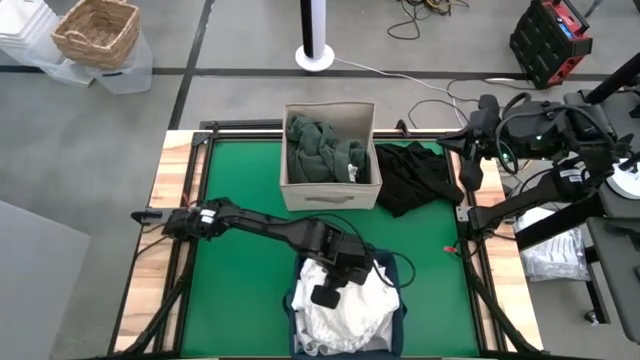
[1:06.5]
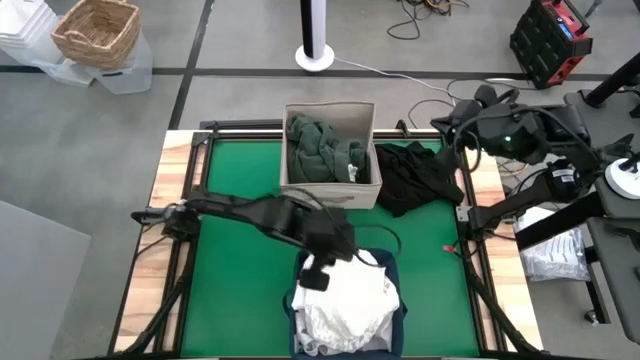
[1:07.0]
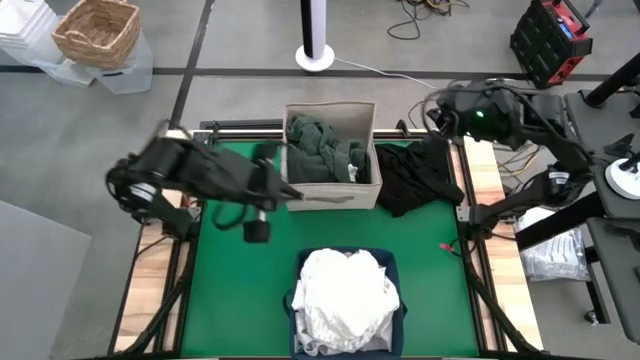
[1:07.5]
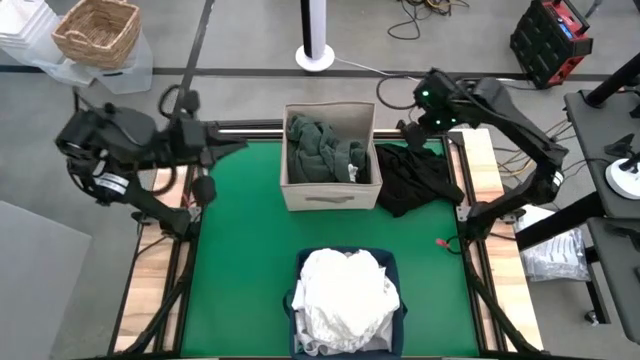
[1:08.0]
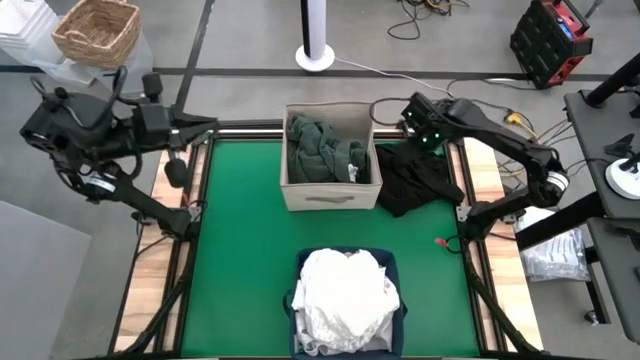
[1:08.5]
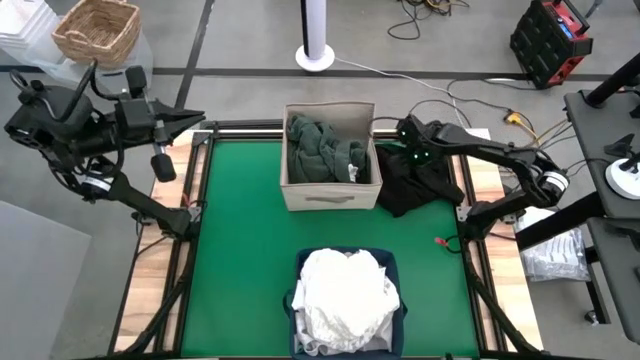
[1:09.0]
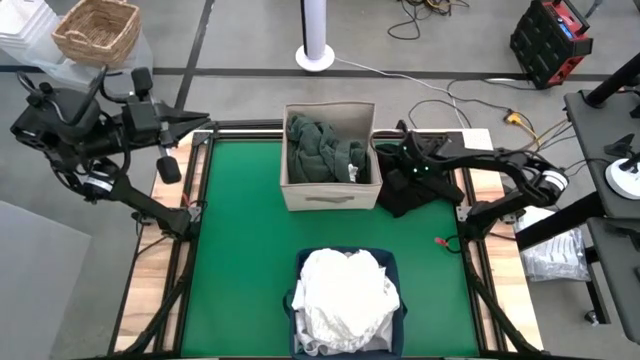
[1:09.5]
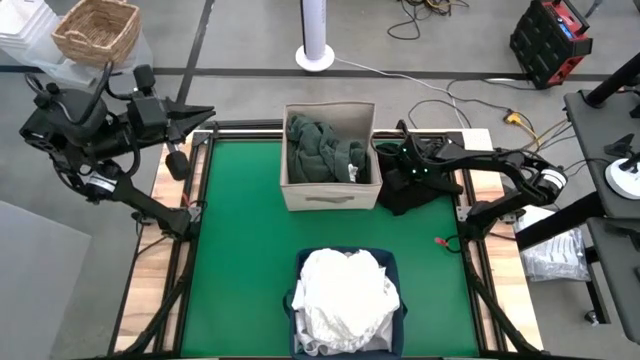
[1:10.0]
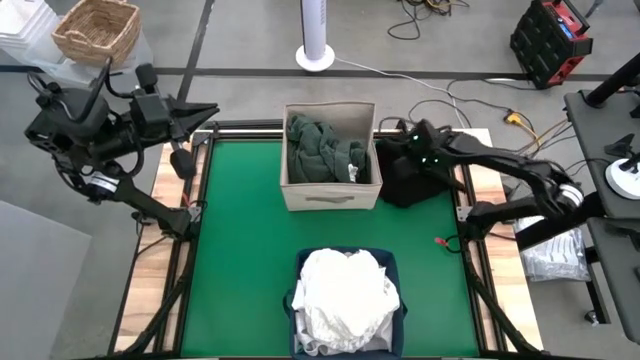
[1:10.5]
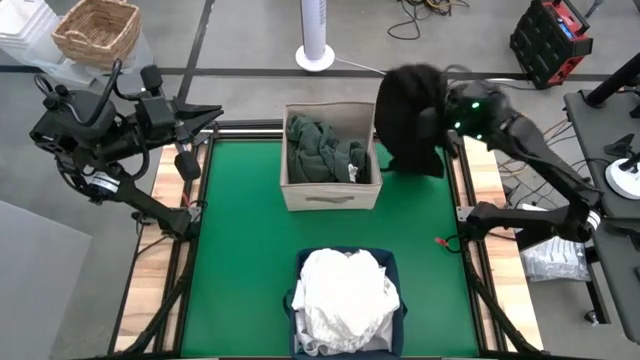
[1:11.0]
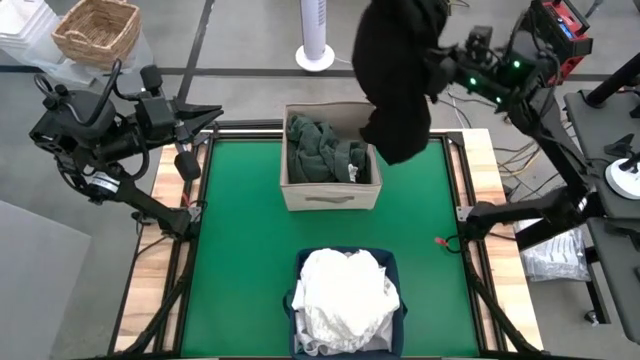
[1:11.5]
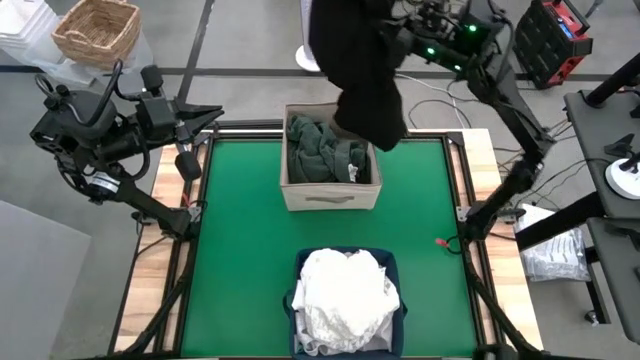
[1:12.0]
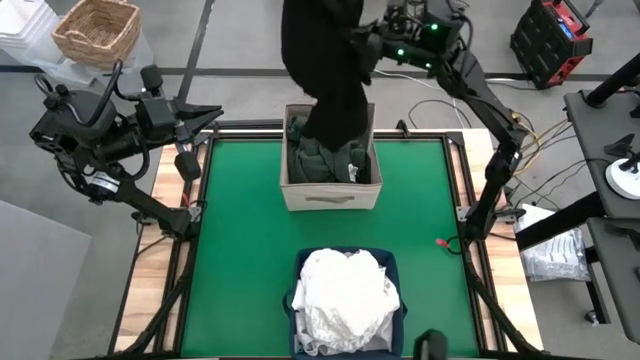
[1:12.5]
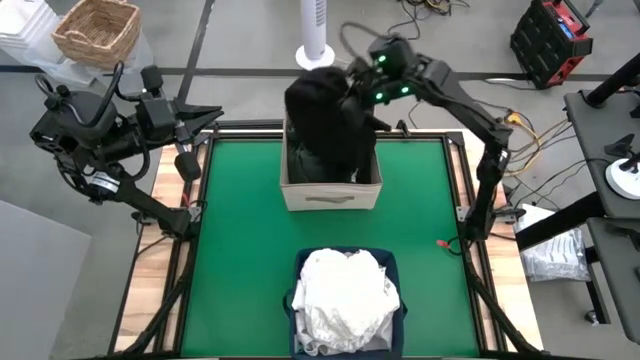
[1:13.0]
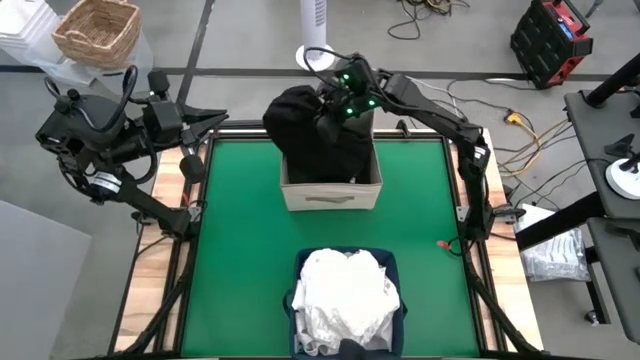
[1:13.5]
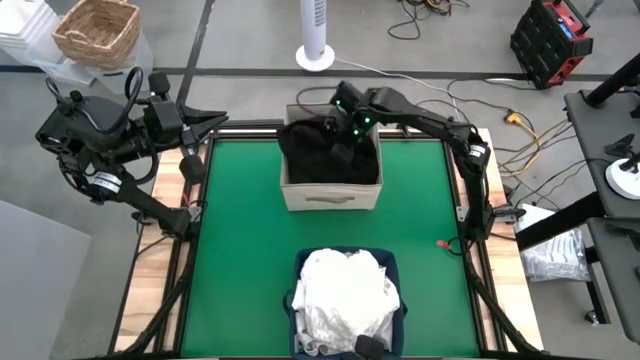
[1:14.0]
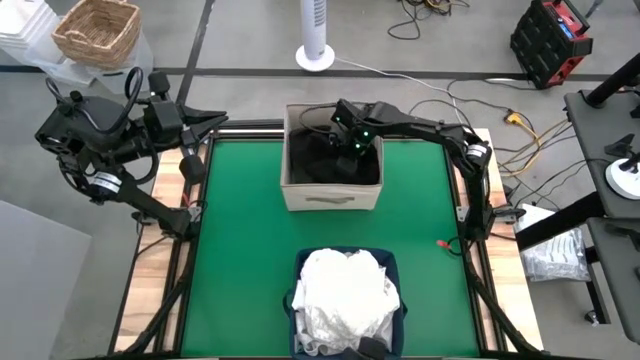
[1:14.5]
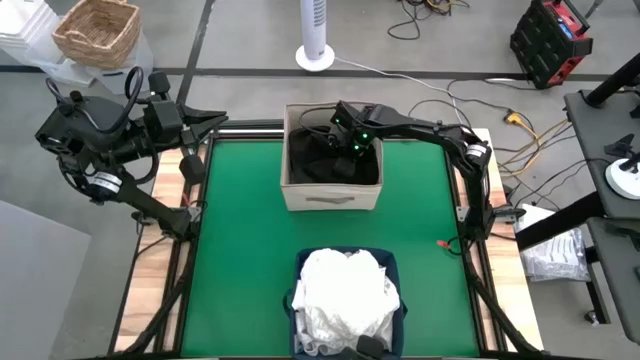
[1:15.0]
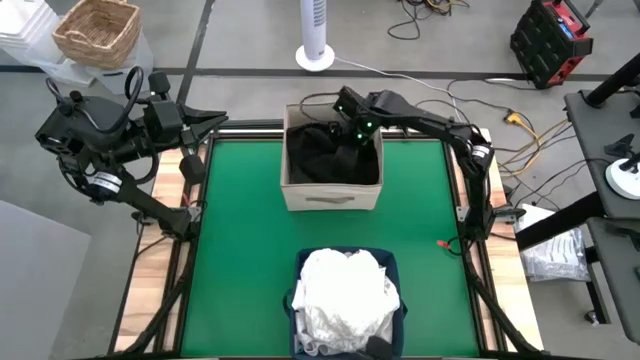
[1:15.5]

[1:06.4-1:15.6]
Put the black shirt into the white laundry bin

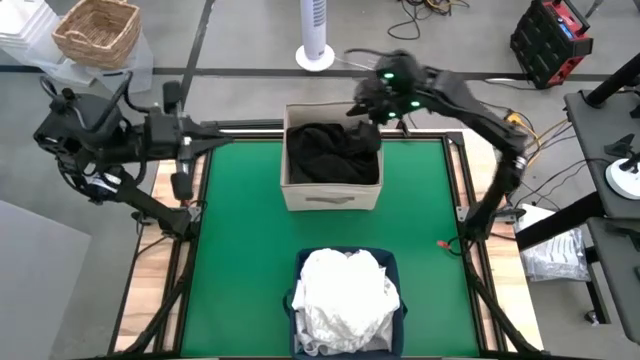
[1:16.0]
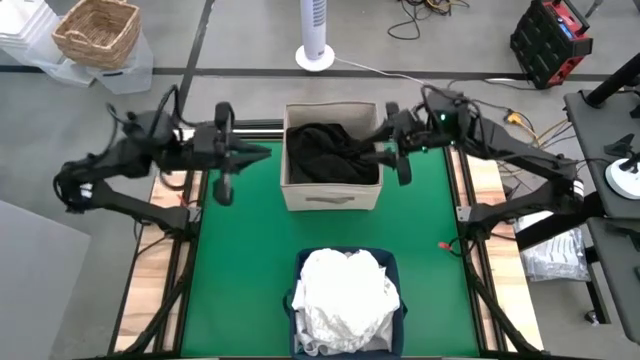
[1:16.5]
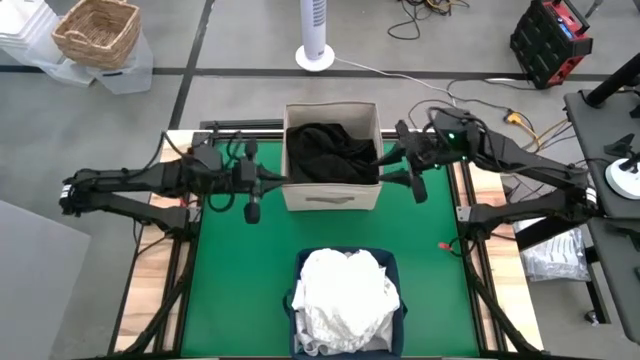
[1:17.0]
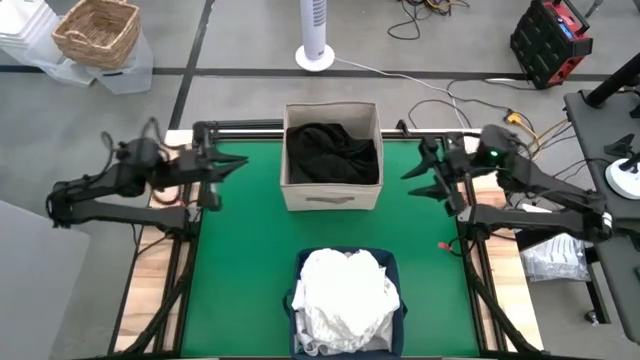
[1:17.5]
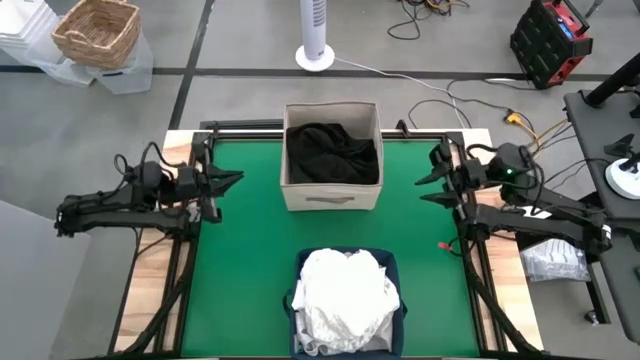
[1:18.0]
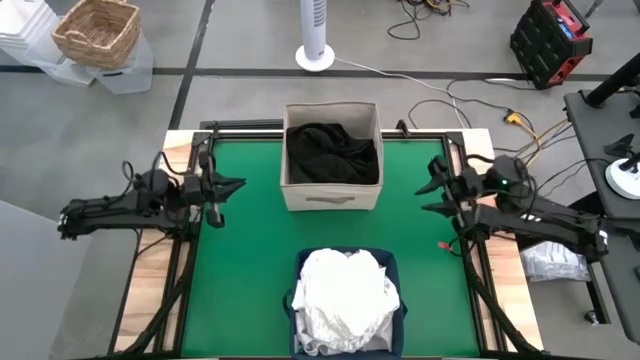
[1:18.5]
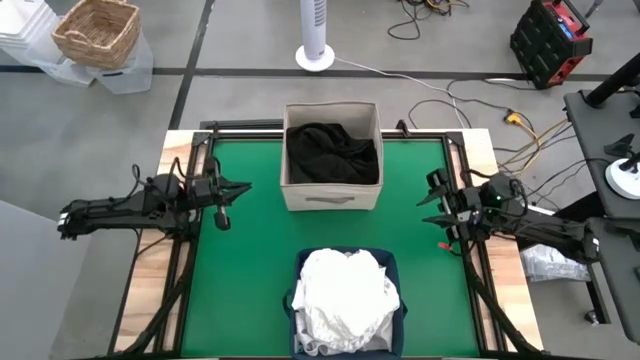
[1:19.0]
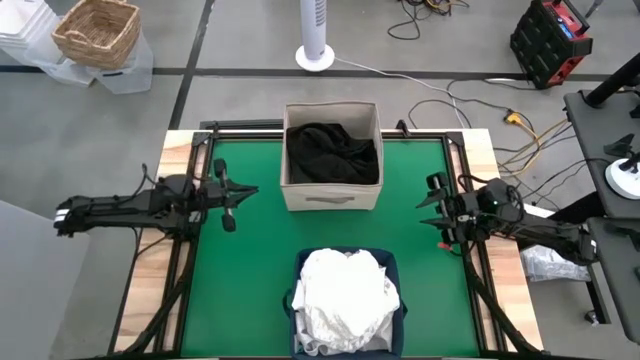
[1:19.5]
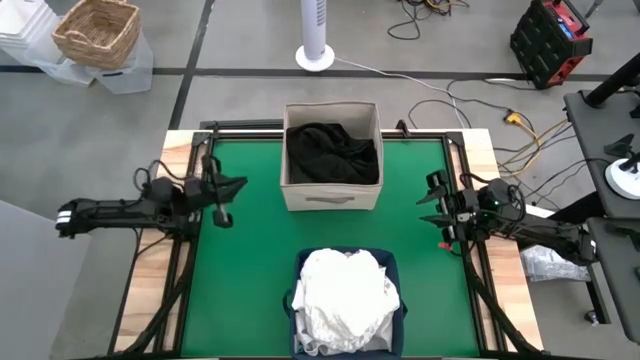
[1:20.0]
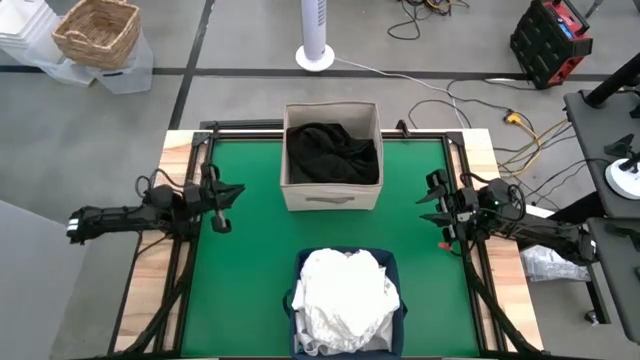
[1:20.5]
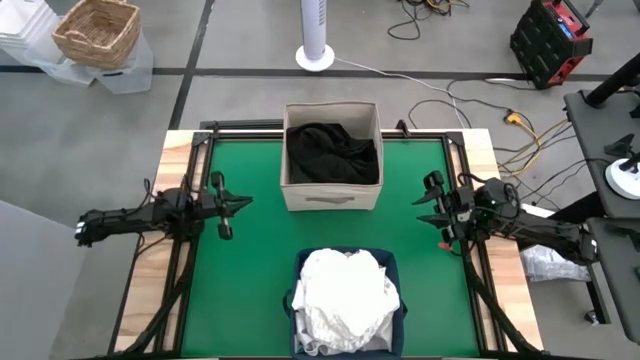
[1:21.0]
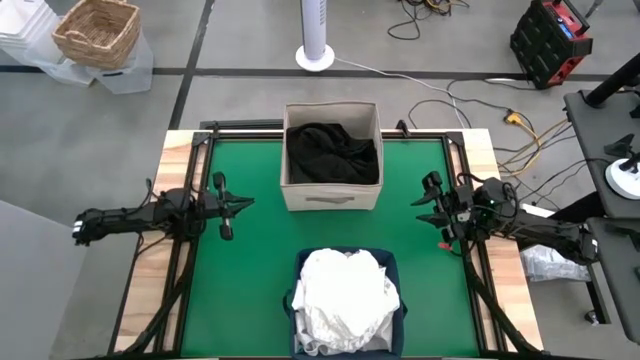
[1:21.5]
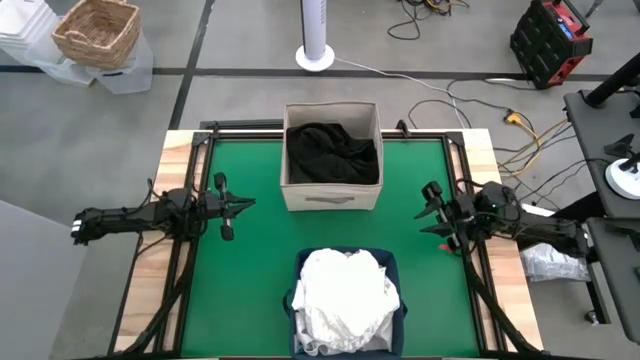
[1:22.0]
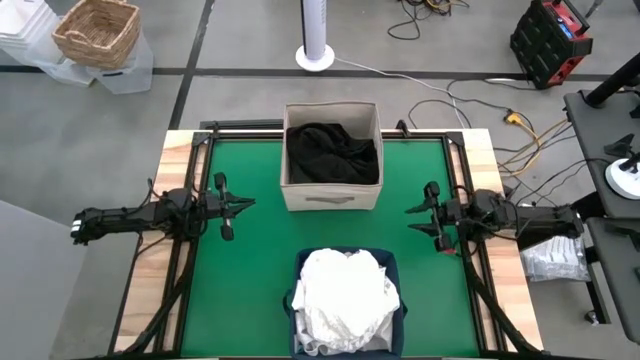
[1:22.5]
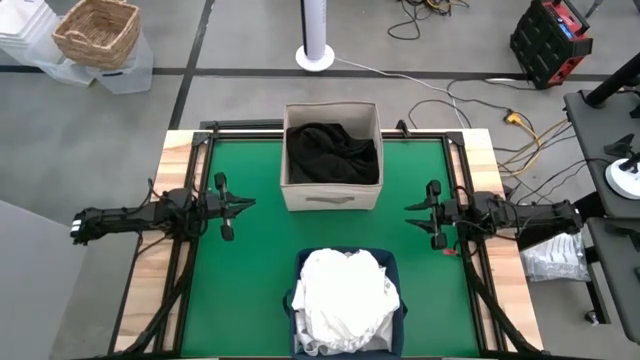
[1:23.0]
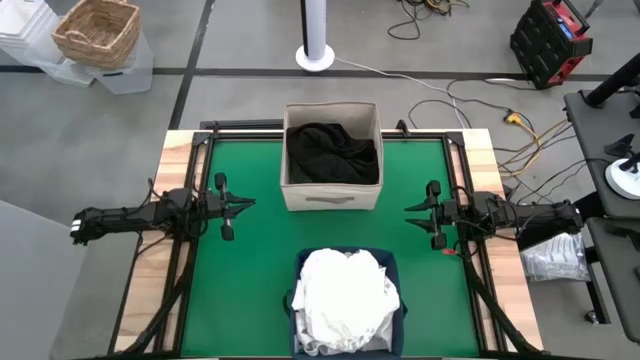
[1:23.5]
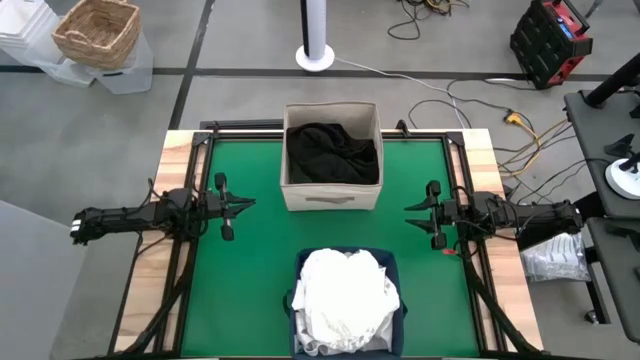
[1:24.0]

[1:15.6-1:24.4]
Return to Home Position
